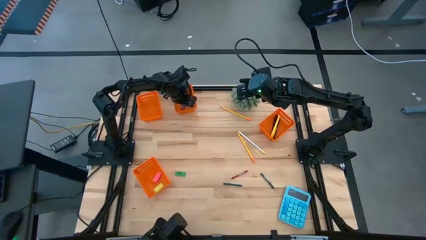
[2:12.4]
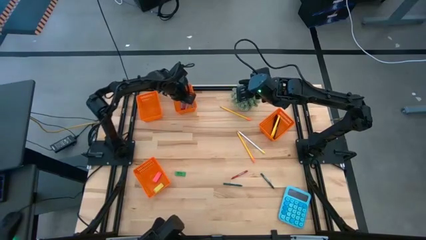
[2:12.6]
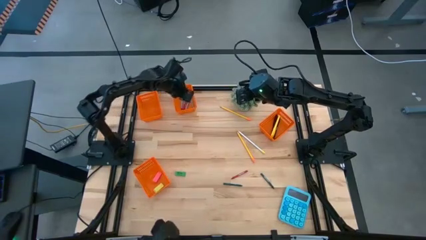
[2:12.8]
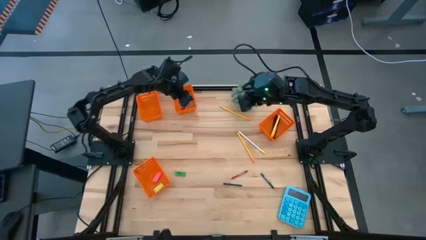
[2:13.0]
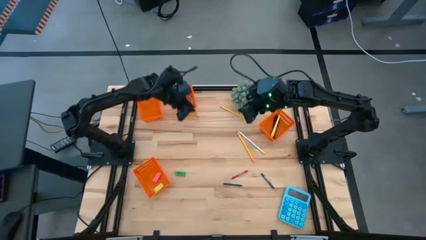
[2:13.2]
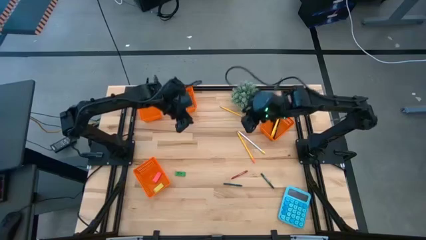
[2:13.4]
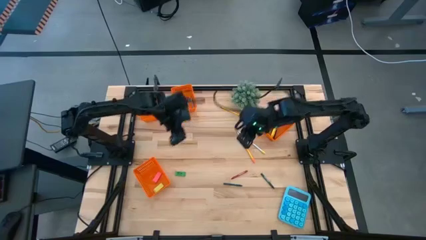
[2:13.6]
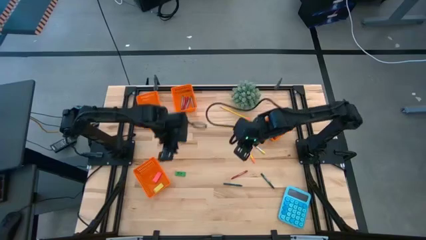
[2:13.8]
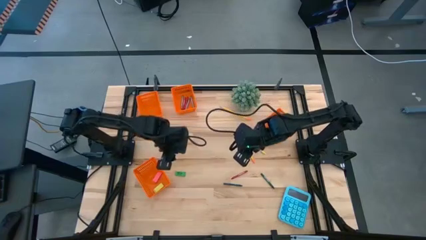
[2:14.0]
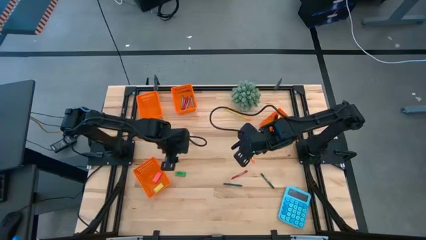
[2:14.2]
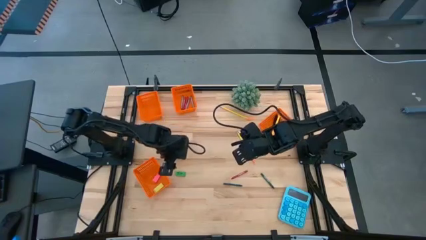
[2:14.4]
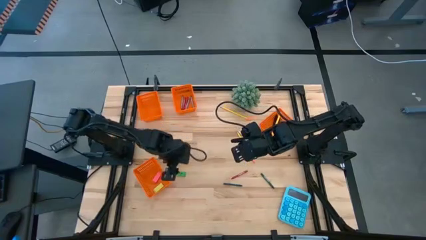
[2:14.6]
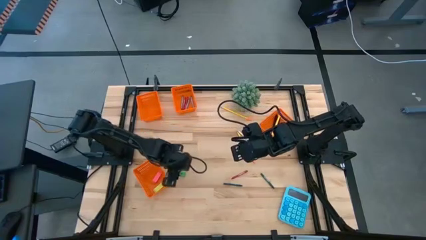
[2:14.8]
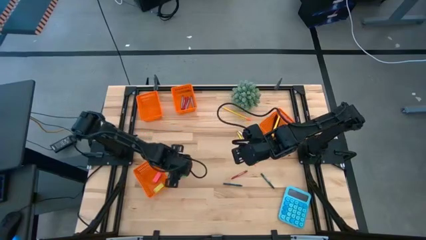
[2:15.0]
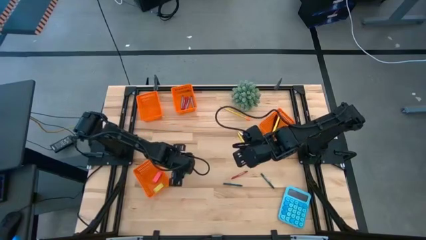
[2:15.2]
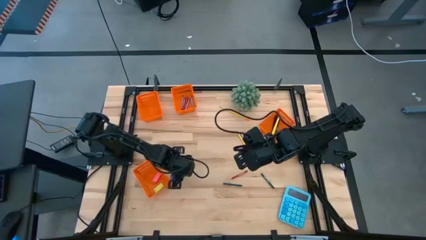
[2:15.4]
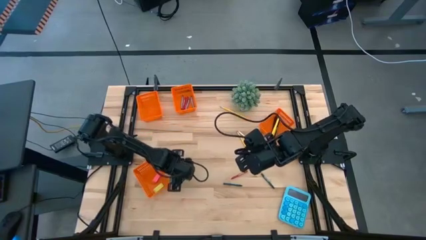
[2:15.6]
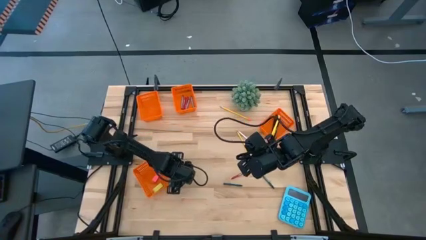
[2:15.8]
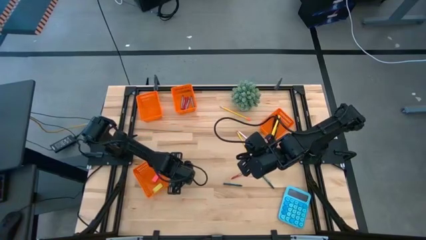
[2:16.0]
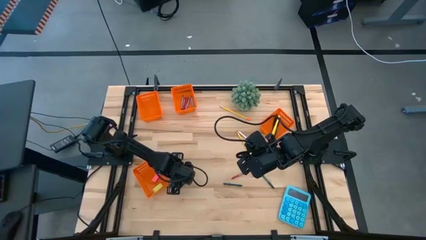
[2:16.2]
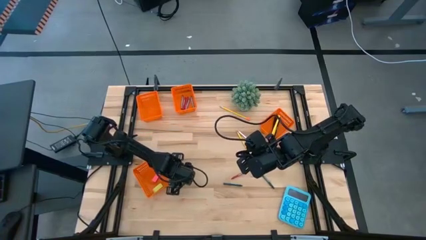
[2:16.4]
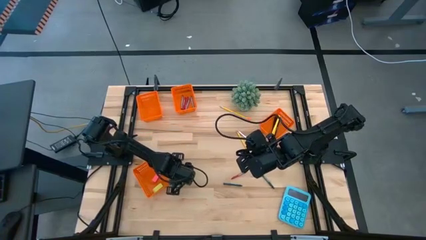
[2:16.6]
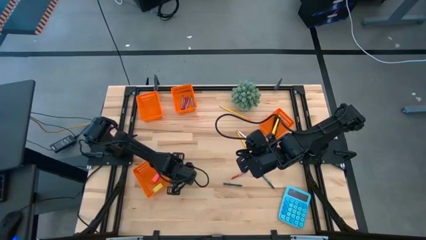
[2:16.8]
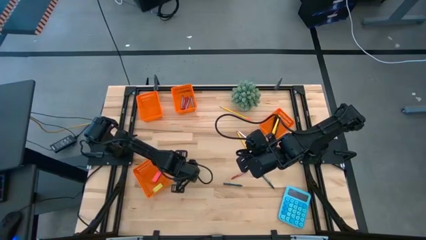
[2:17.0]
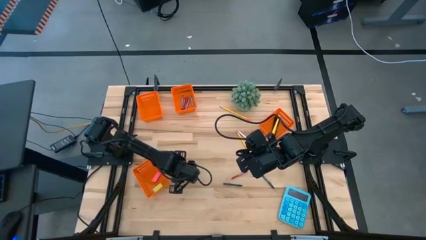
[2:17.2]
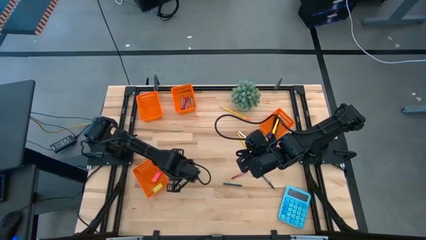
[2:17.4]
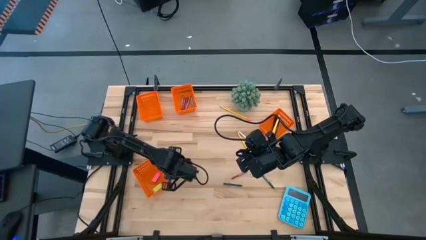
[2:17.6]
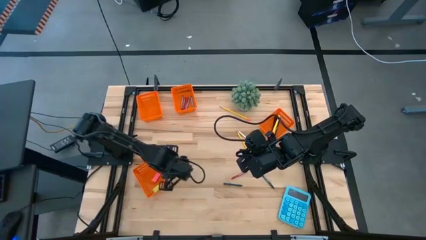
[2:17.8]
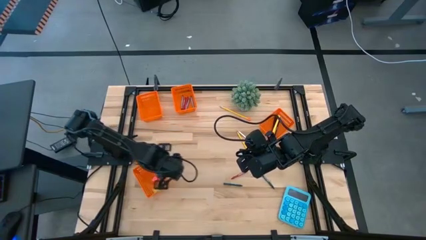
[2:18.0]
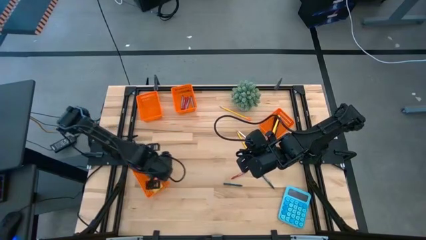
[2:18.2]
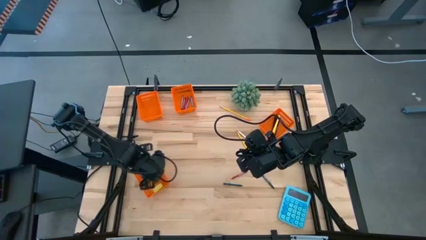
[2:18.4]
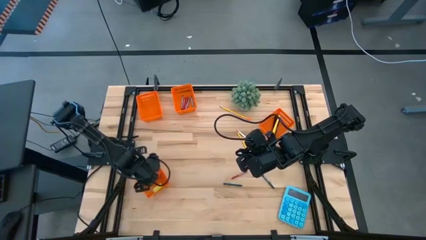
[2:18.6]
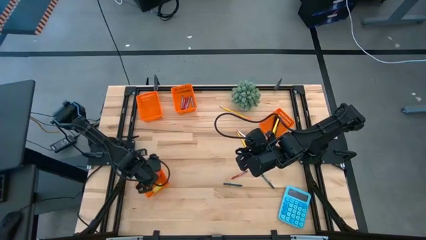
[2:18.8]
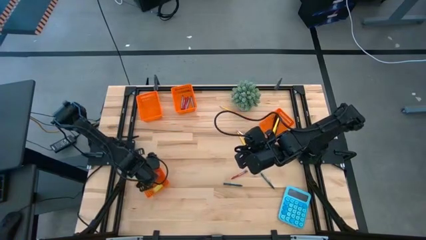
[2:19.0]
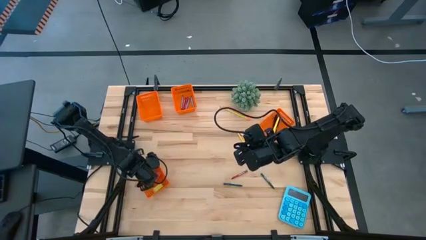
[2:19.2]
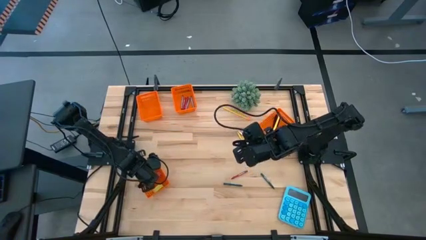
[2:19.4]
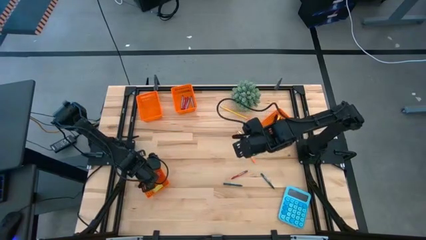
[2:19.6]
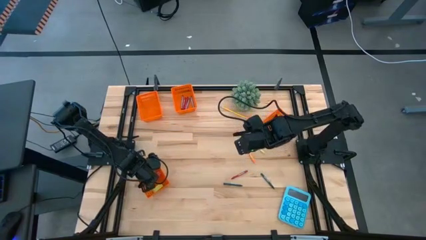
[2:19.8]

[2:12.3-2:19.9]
Task: Sort crayons/erasers/pens/pencils in bins
Put the green eraser into the bottom orange bin

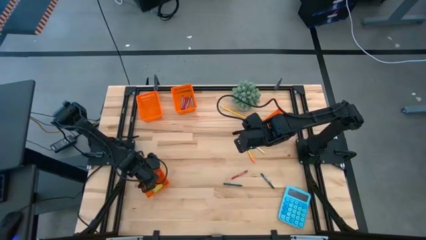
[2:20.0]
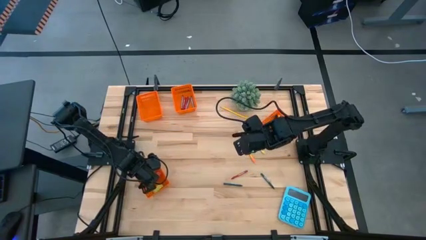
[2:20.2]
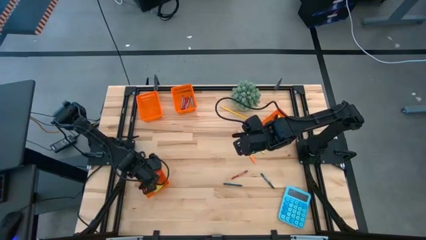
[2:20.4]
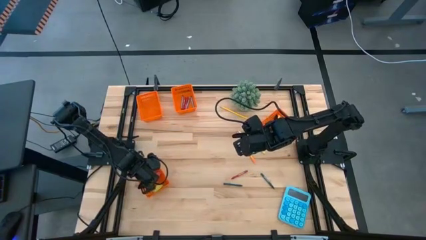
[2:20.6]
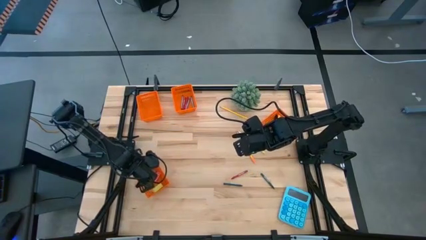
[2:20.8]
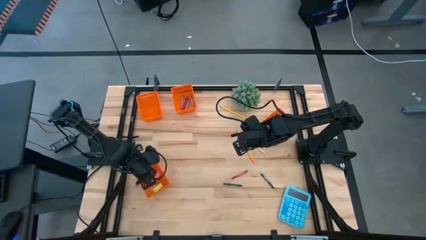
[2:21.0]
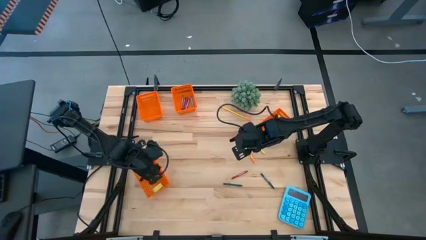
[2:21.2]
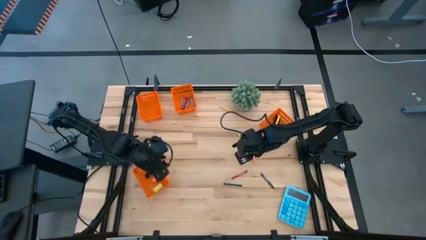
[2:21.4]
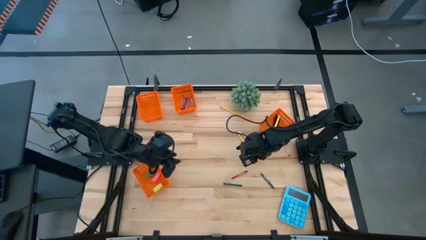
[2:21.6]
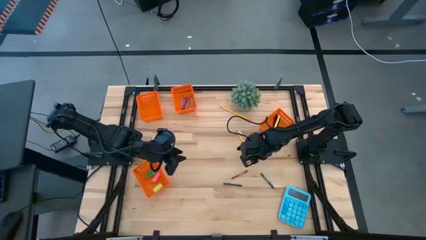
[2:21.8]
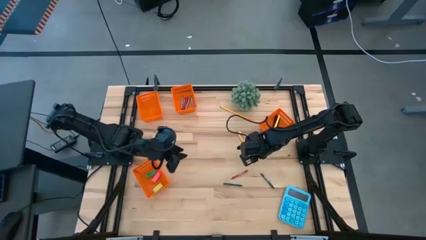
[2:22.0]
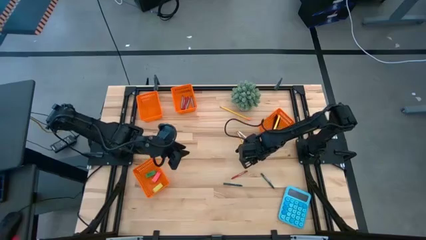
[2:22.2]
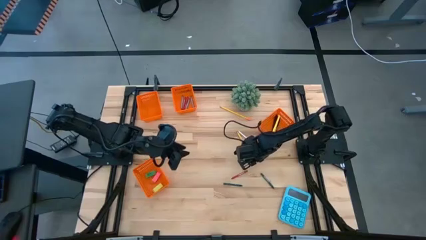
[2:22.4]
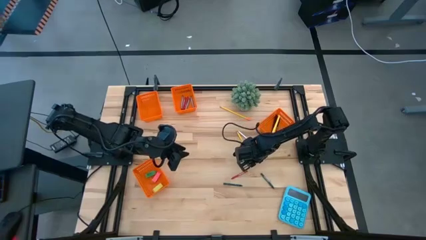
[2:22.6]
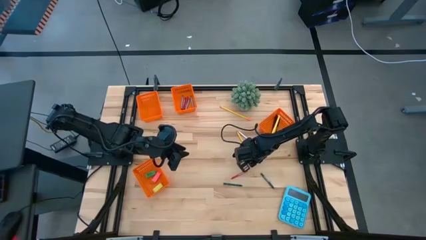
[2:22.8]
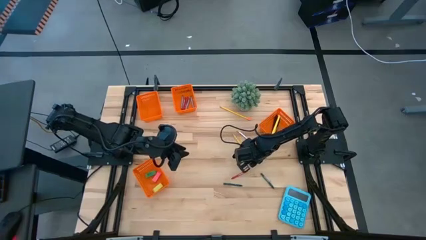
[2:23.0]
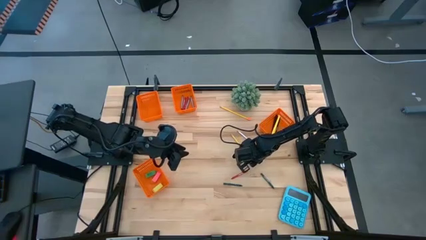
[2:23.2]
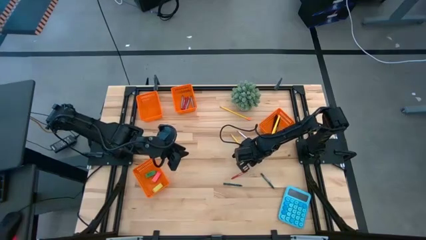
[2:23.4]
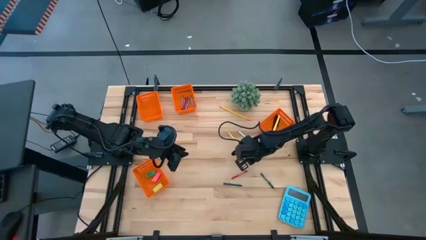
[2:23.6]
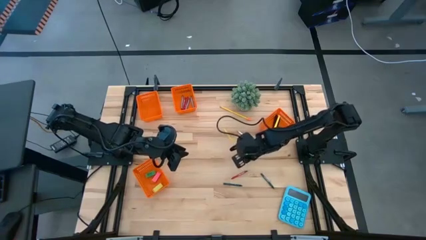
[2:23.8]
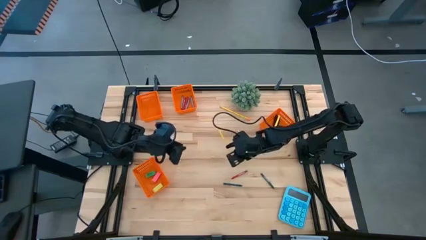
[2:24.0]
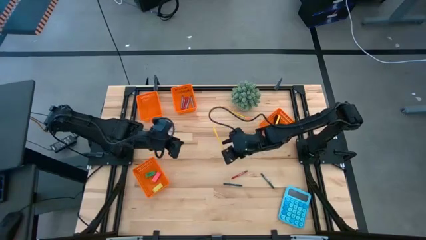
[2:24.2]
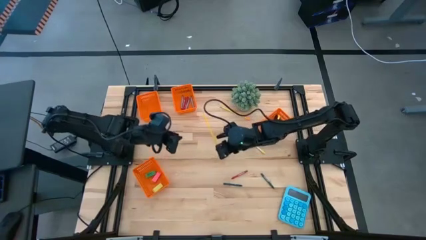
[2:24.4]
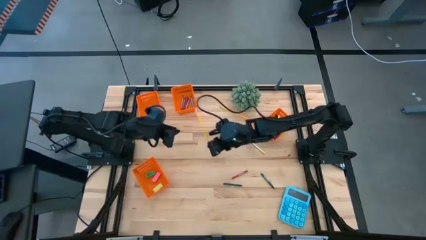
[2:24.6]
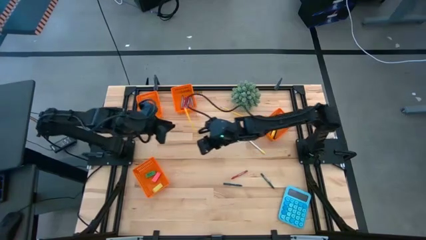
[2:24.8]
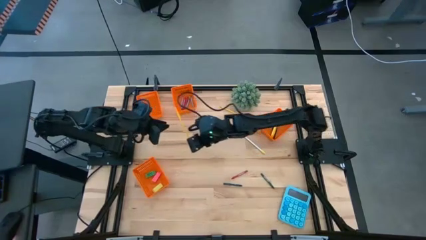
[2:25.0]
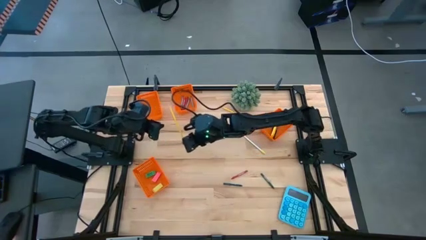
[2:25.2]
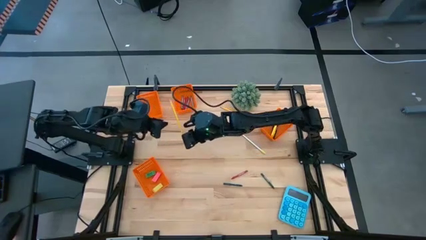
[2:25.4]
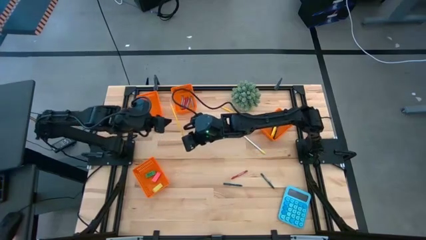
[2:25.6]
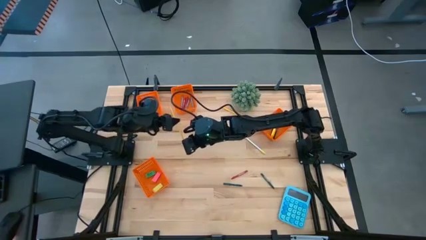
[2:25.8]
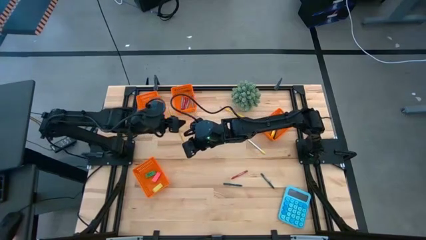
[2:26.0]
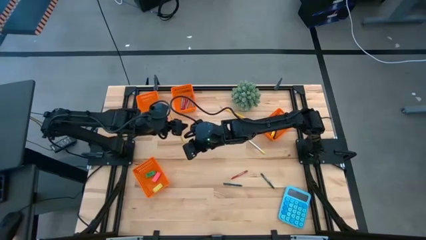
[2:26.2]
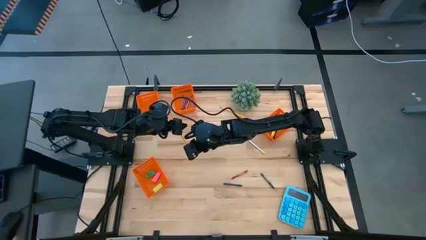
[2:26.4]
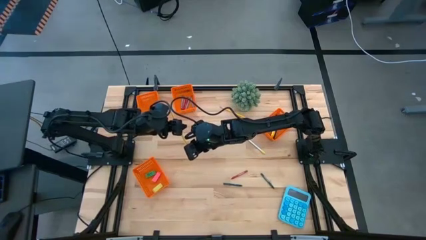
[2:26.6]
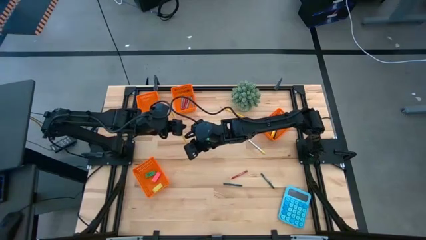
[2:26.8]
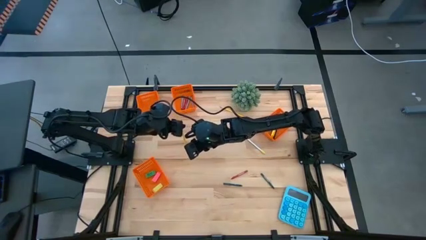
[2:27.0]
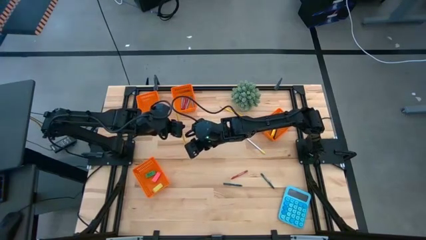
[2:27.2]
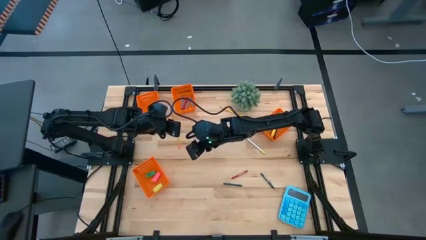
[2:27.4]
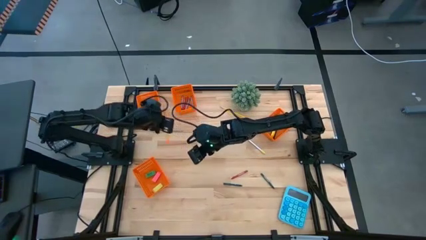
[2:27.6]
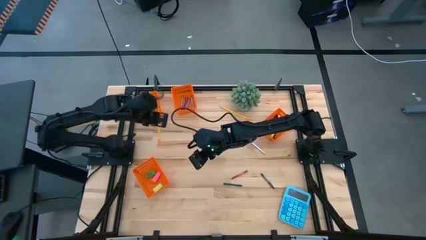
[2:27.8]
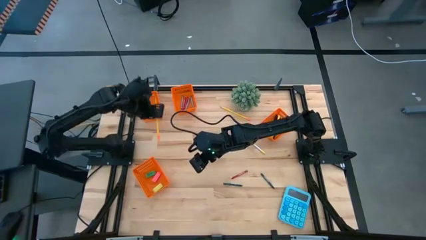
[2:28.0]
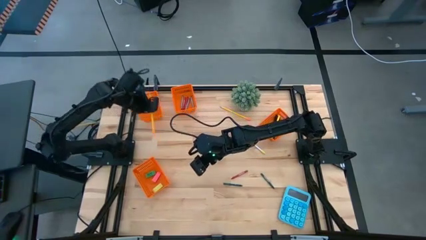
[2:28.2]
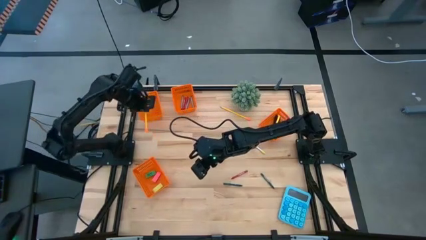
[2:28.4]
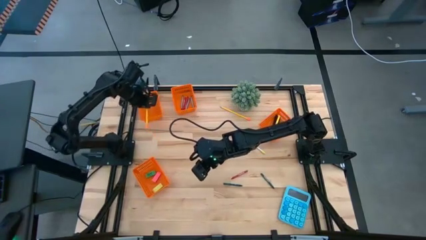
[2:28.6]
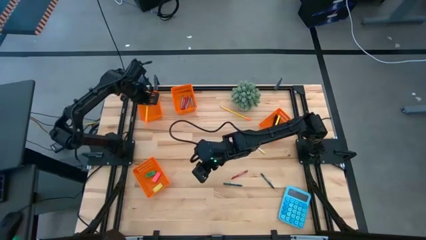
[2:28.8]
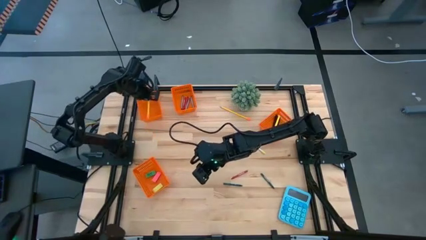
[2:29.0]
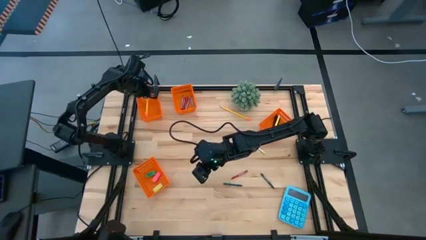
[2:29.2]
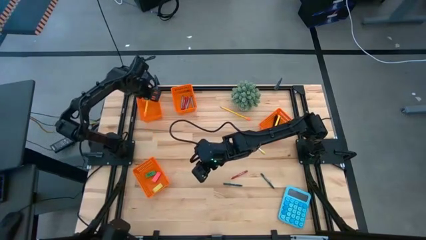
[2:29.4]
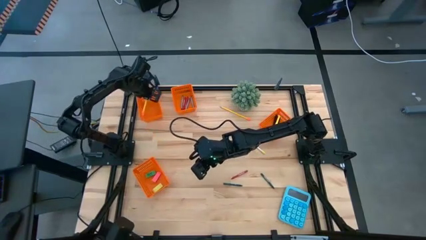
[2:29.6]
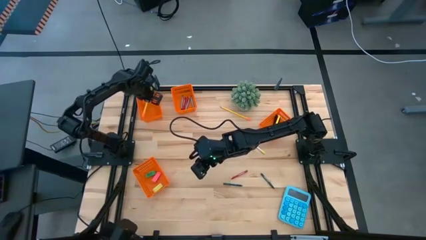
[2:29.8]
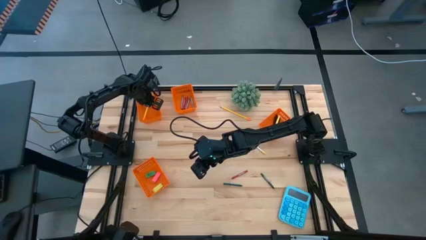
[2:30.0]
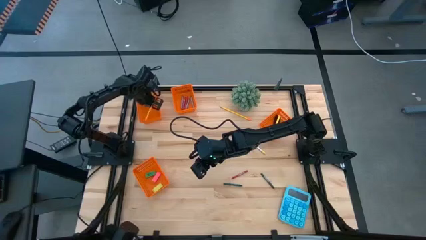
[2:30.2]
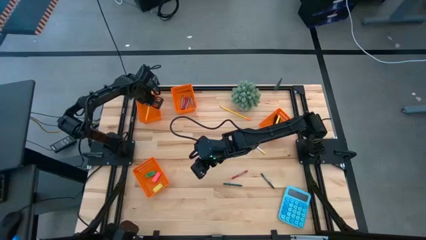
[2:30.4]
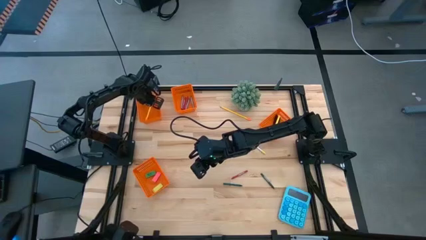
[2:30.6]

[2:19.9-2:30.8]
Put the bottom yellow pencil into the top left orange bin
